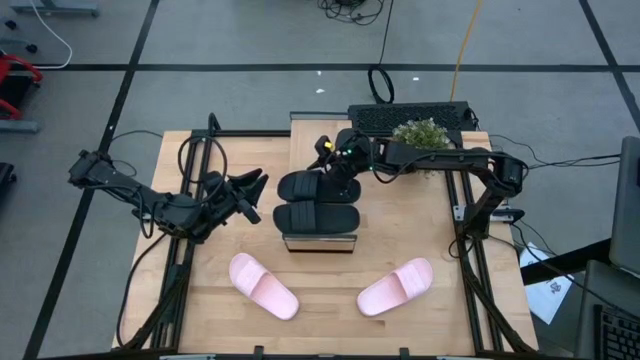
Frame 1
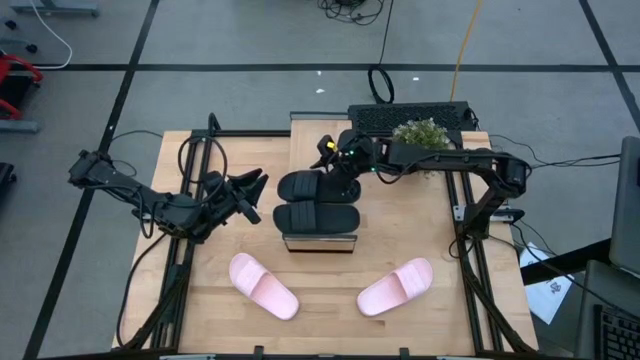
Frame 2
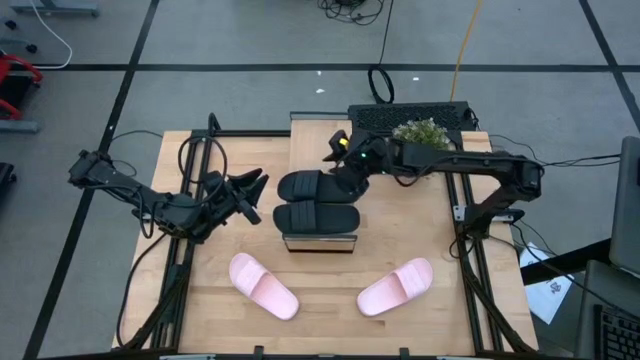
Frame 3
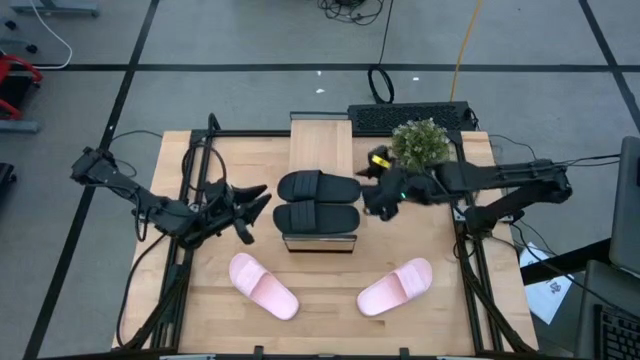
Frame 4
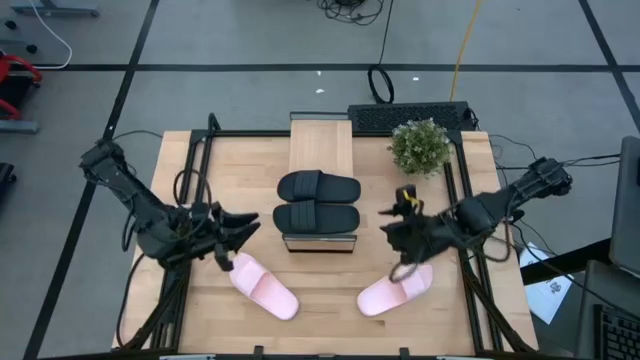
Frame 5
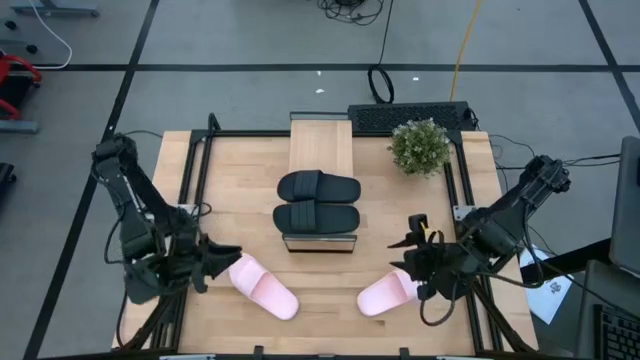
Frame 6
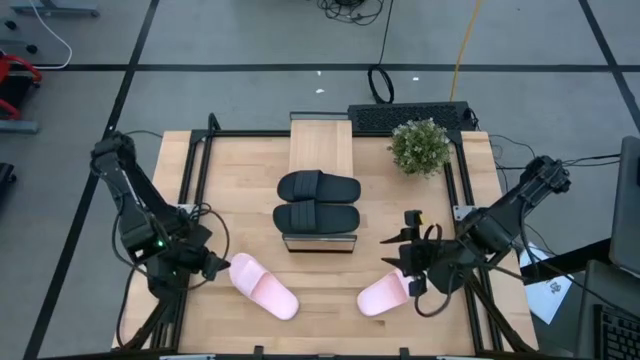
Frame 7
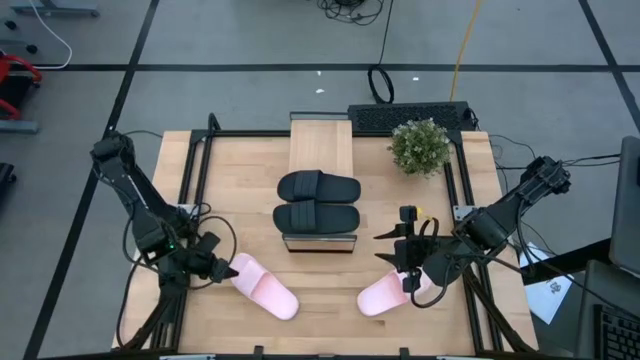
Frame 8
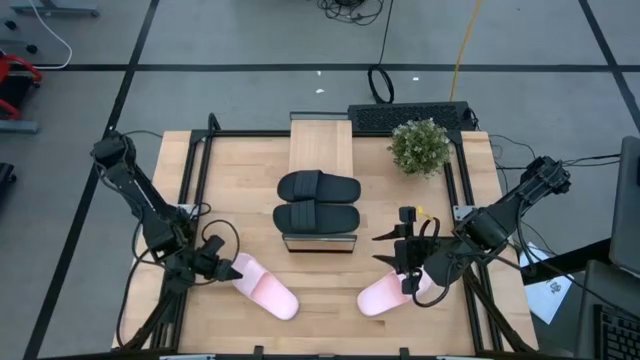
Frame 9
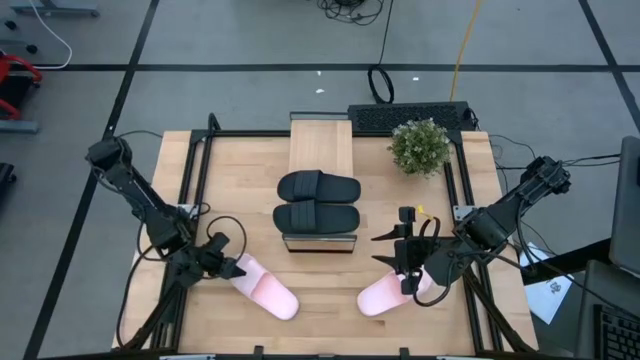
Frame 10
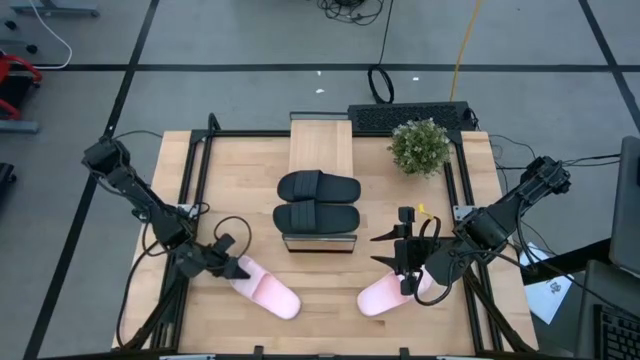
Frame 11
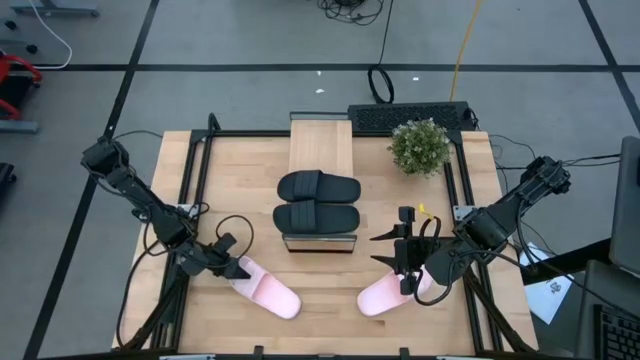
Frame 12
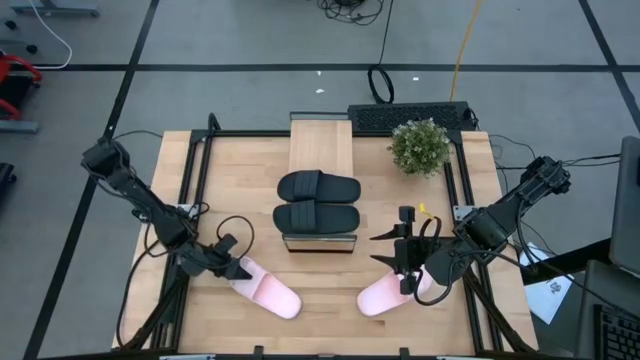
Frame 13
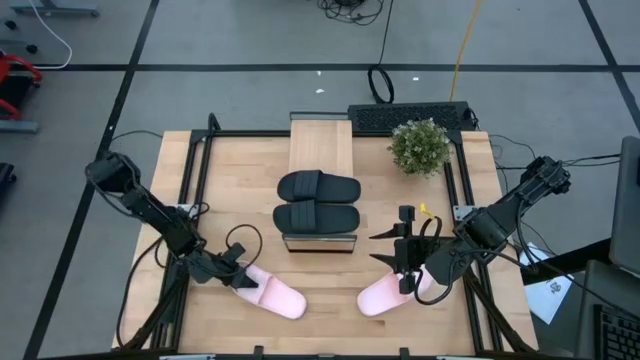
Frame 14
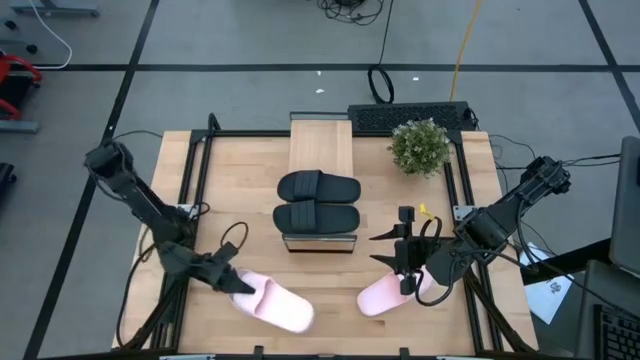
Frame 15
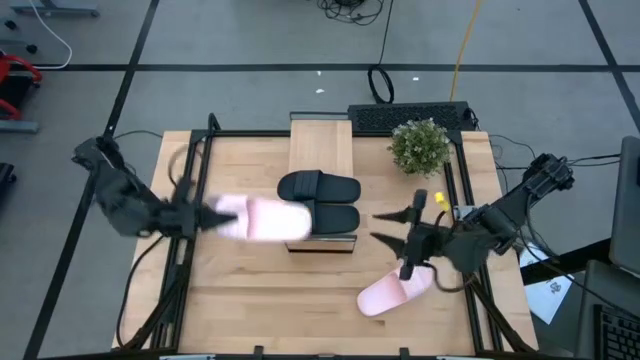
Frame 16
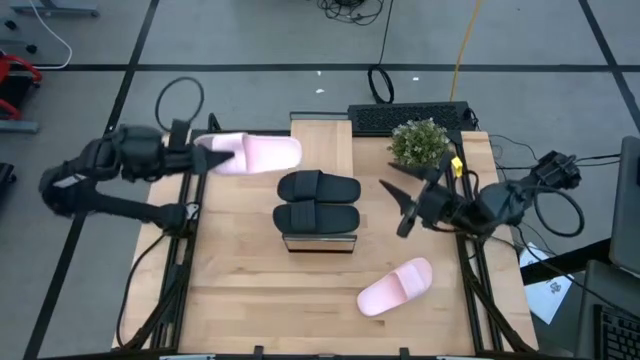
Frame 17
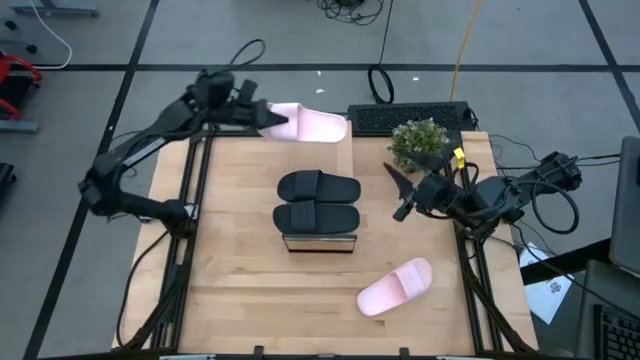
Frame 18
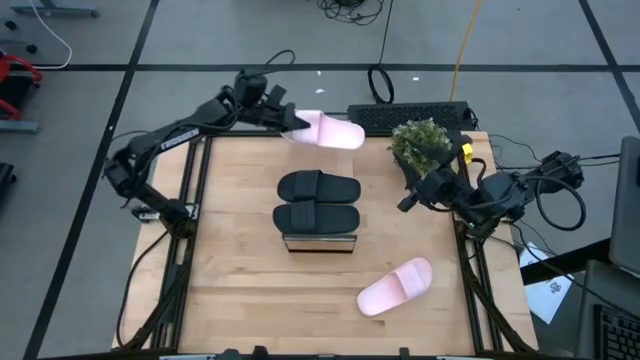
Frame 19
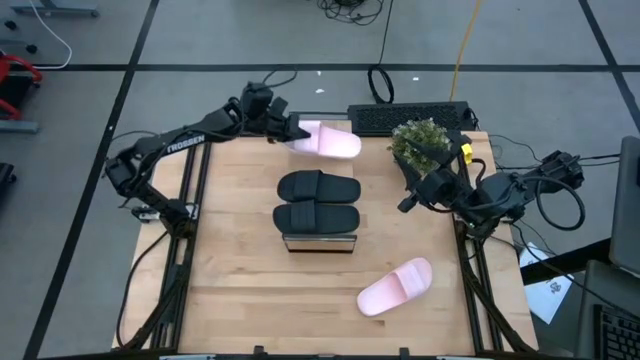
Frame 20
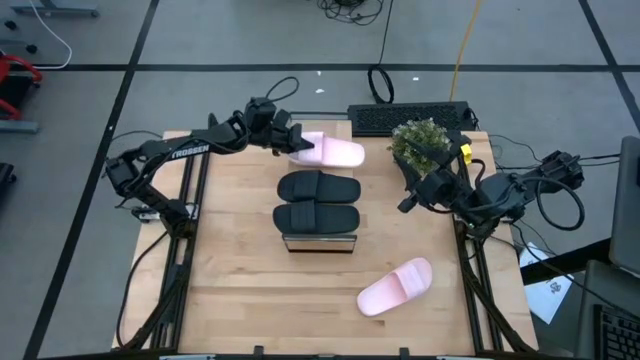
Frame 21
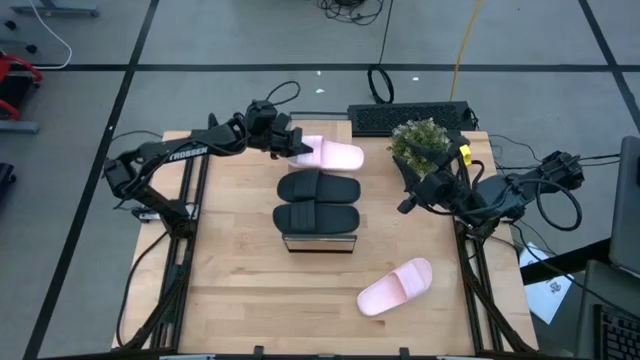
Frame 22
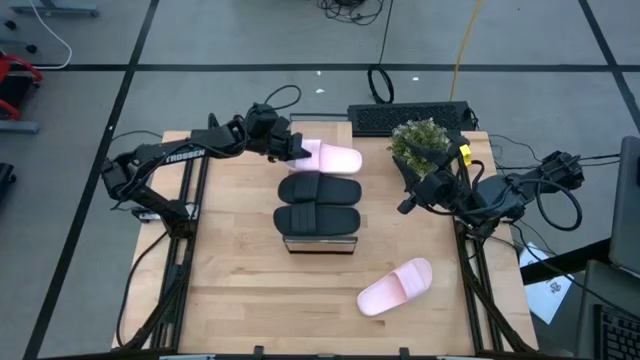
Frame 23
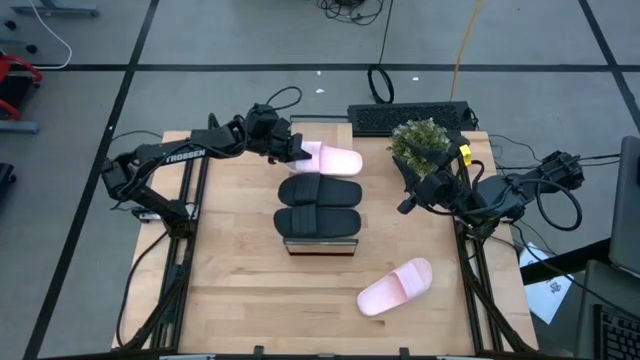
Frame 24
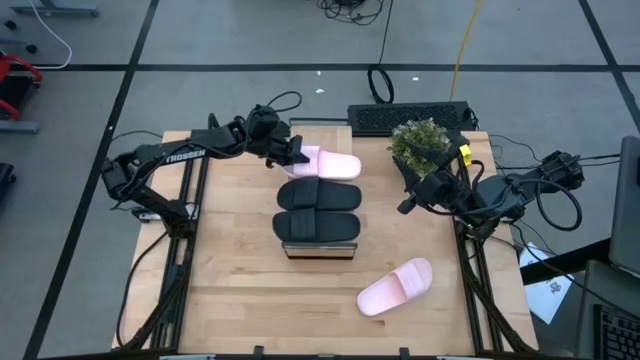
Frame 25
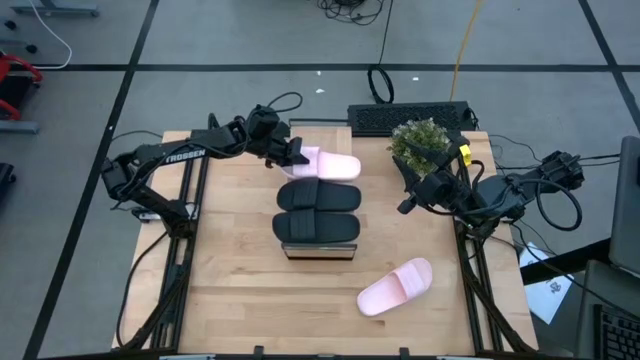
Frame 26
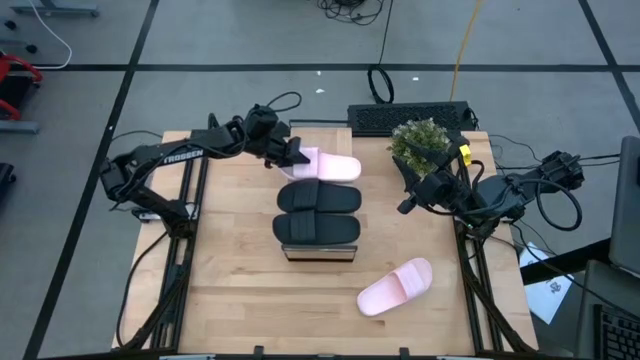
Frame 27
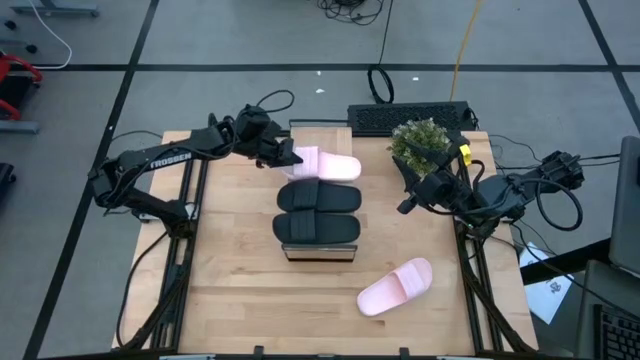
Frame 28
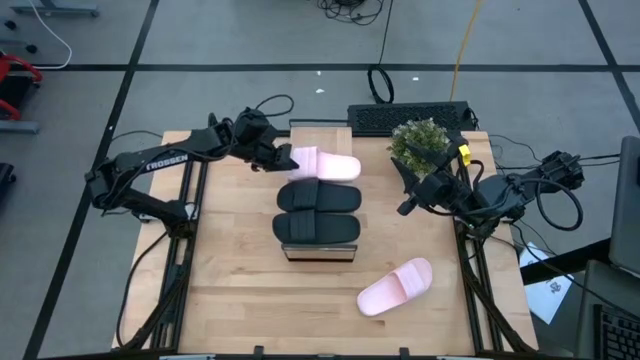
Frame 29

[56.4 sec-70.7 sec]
Task: Pick and place slides into the shelf
Put the left pink slide on the shelf

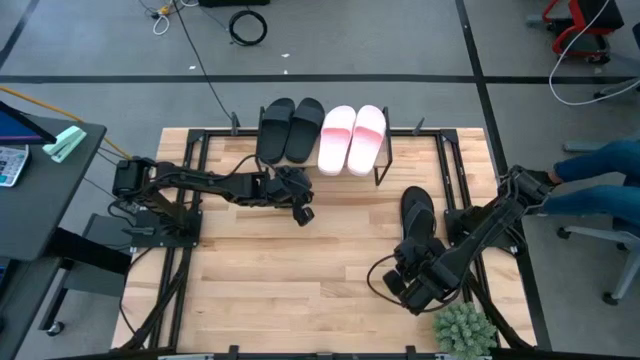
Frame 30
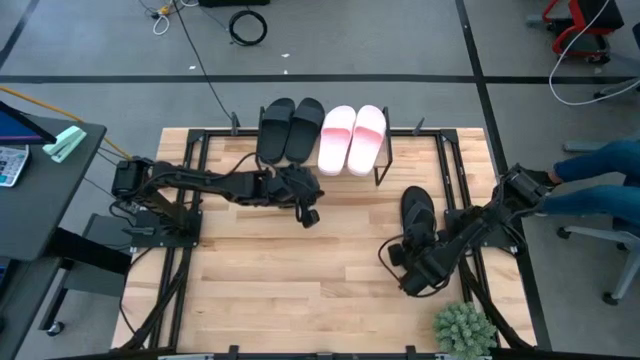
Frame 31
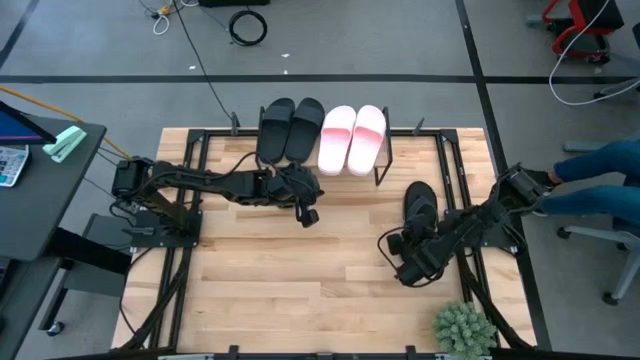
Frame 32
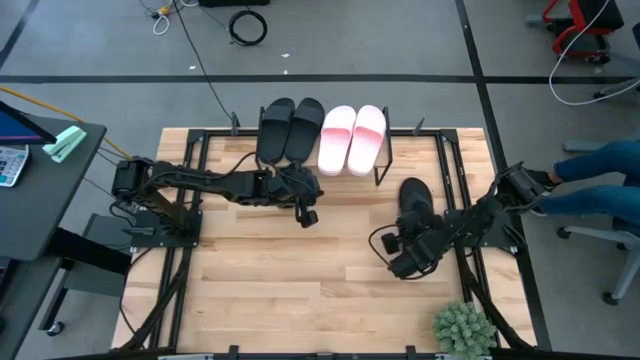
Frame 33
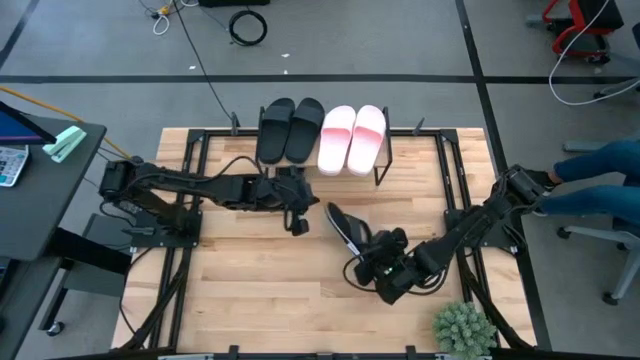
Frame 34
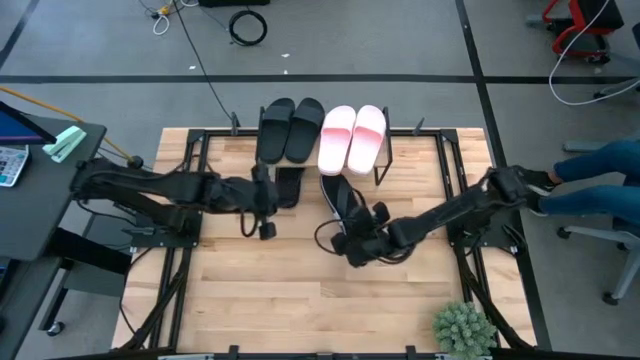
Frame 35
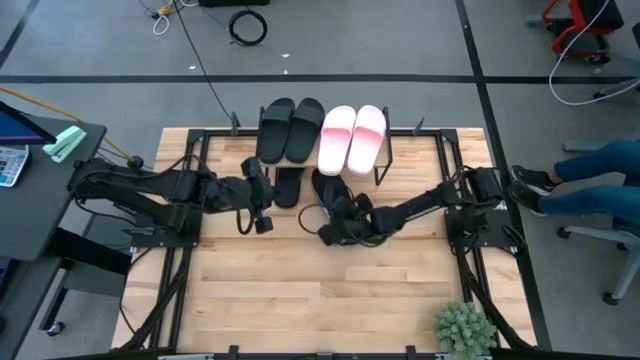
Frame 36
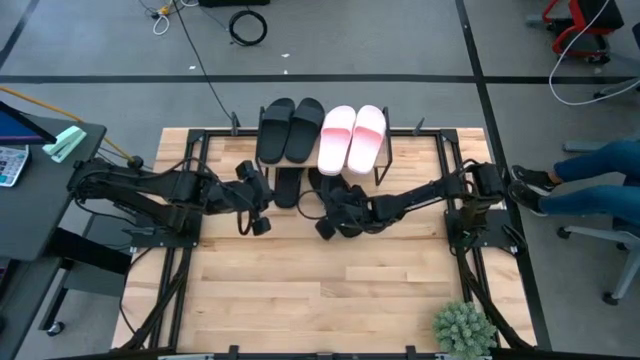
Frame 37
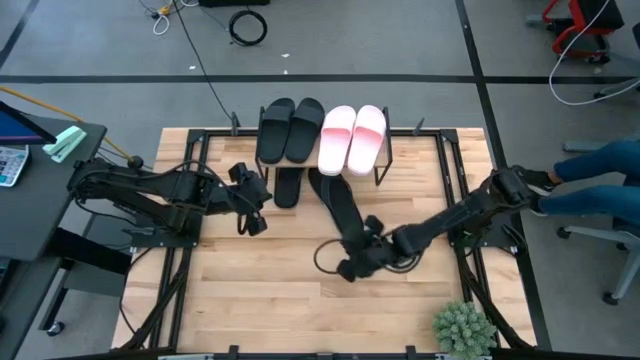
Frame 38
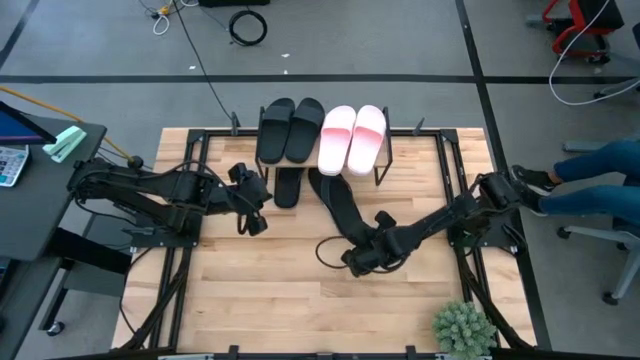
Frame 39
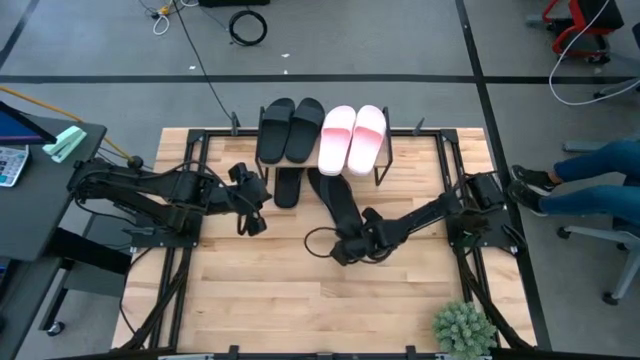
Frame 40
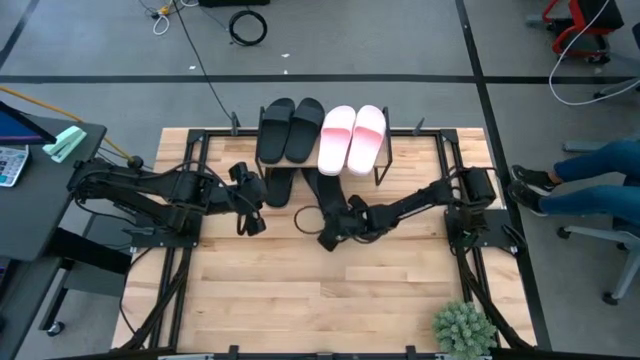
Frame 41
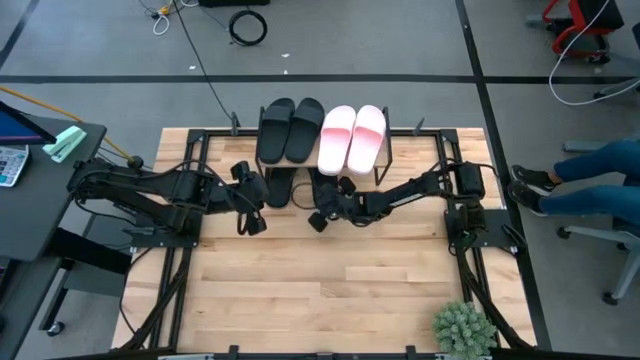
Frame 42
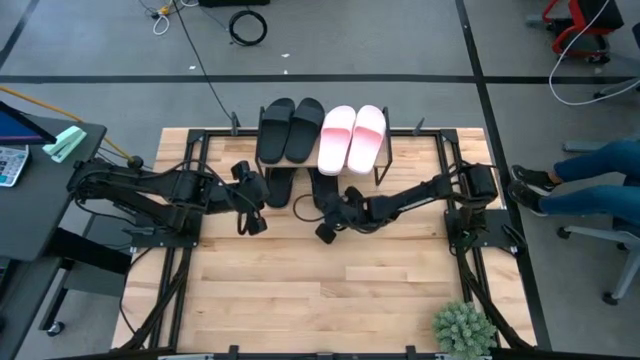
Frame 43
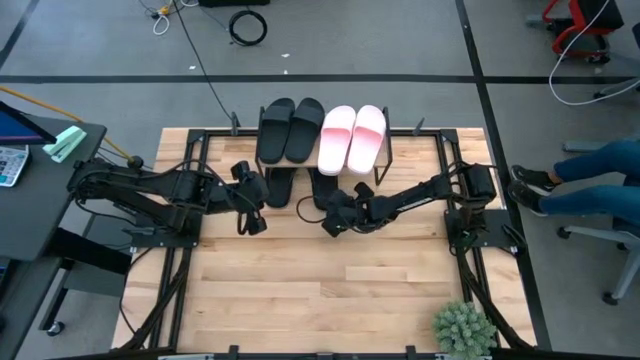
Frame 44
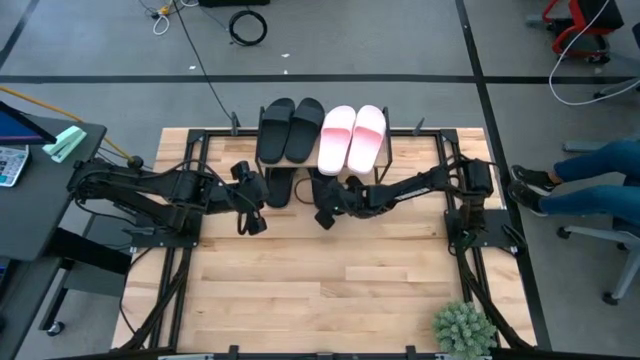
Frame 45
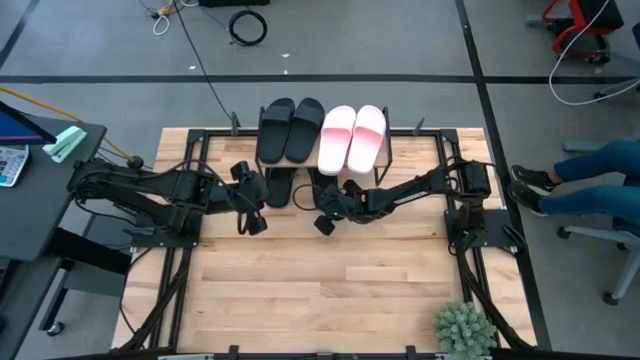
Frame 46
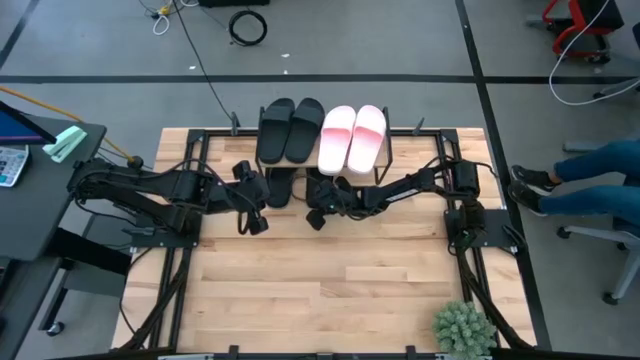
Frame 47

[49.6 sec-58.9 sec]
Task: Pick and place slides into the shelf
Put the black slipper under the shelf
